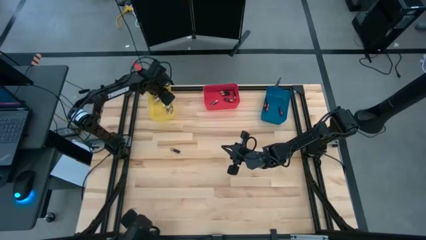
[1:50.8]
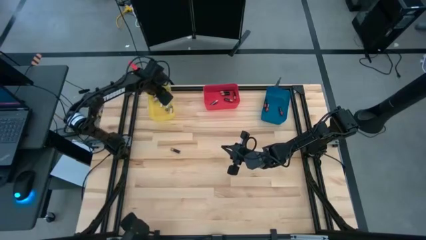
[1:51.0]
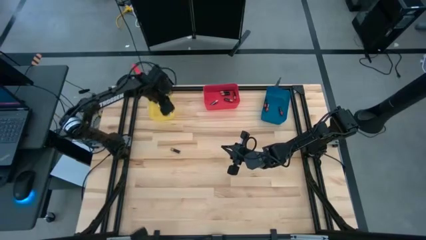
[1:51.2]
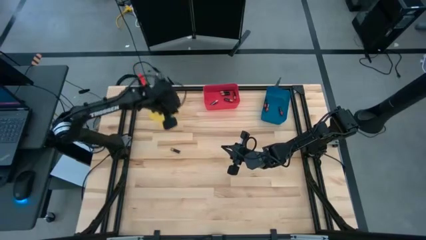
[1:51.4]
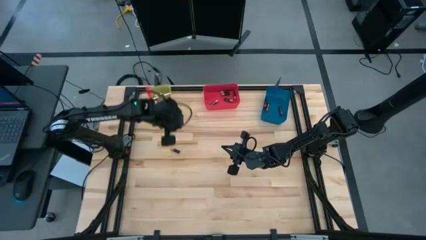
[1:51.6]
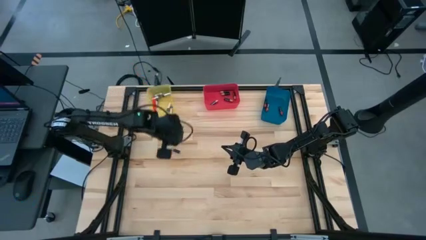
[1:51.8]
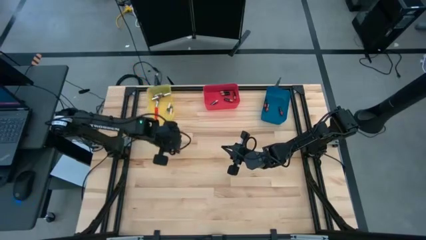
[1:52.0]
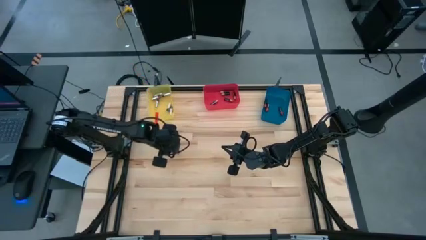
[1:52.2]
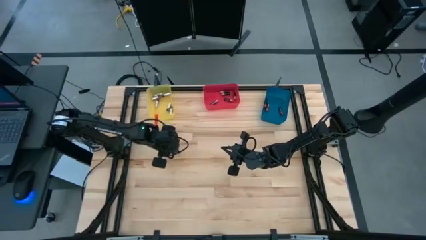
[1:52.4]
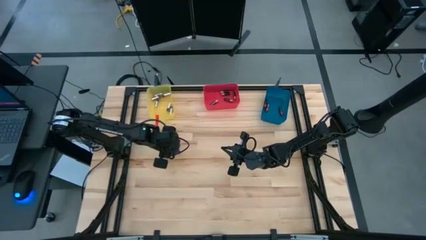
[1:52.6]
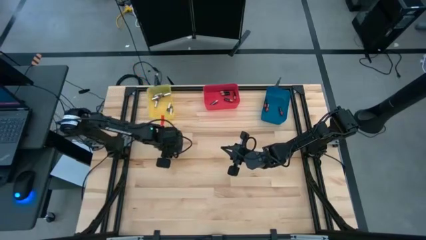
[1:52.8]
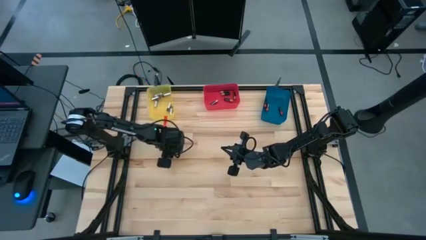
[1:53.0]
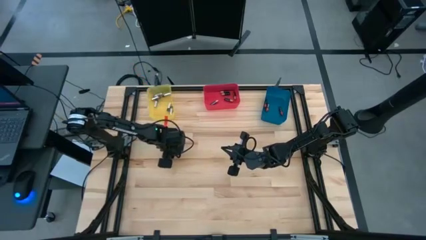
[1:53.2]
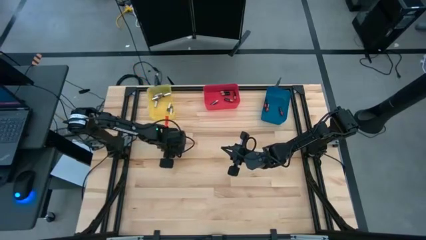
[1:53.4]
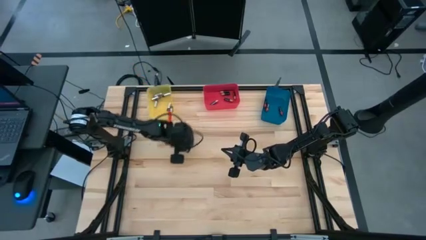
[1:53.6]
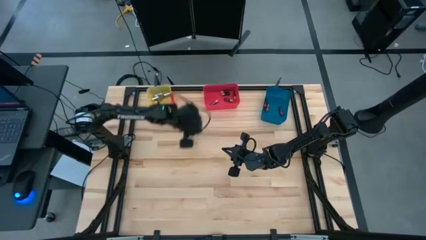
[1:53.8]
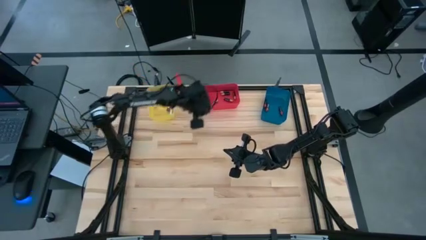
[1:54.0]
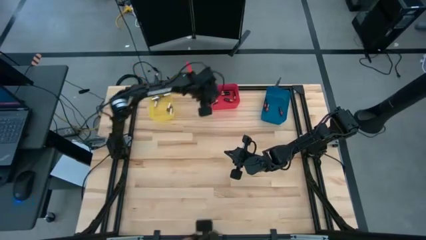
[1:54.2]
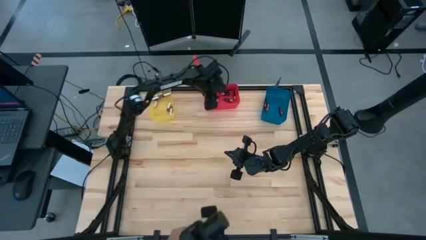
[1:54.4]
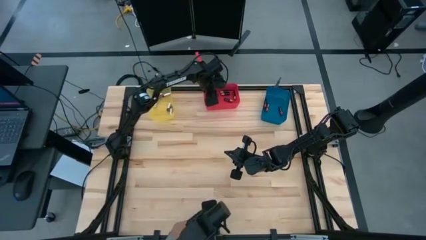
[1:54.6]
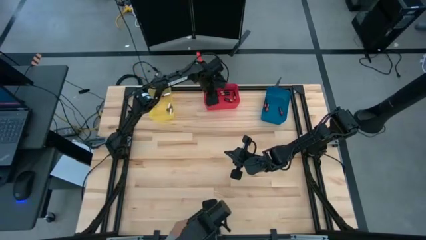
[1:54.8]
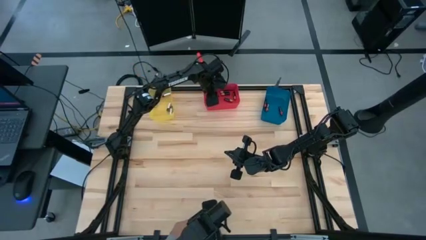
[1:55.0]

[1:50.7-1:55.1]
Task: Sort batteries
Put the brown battery into the red bin

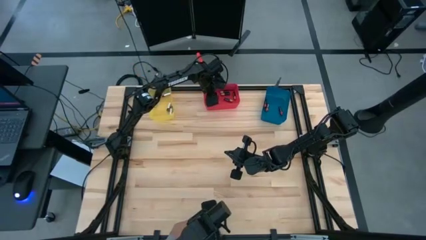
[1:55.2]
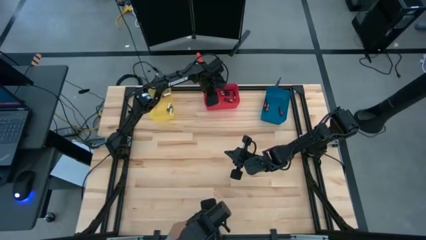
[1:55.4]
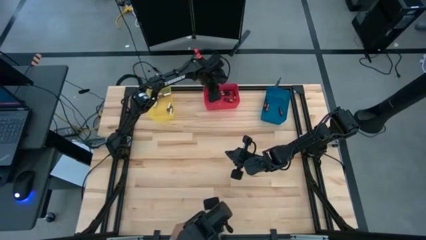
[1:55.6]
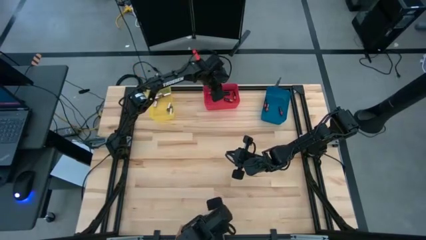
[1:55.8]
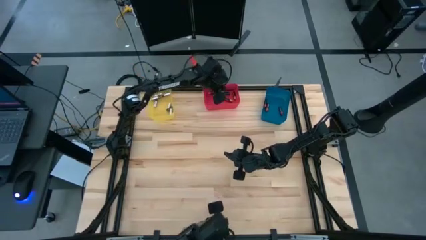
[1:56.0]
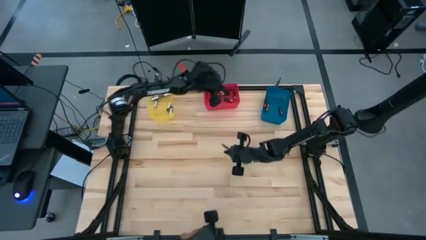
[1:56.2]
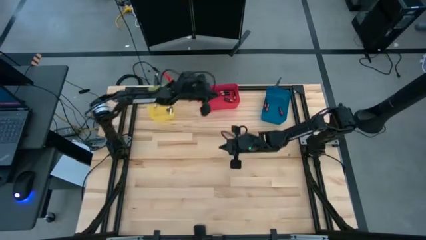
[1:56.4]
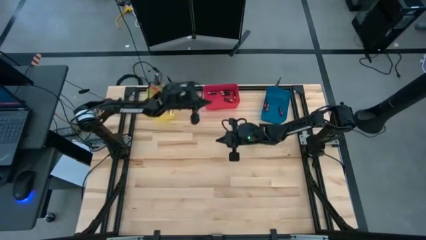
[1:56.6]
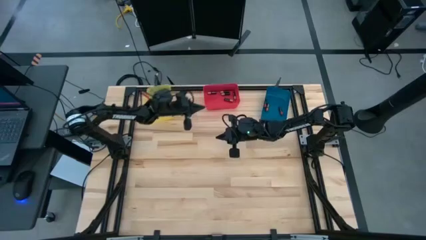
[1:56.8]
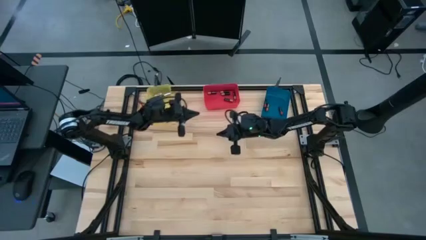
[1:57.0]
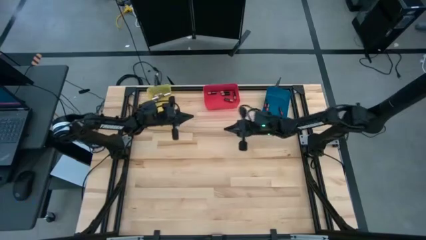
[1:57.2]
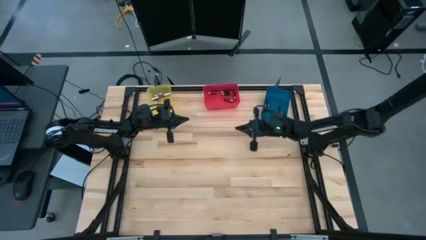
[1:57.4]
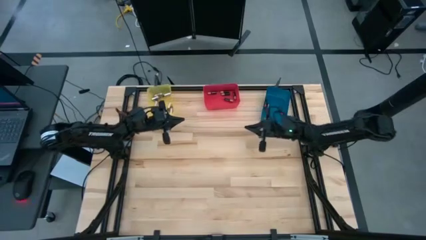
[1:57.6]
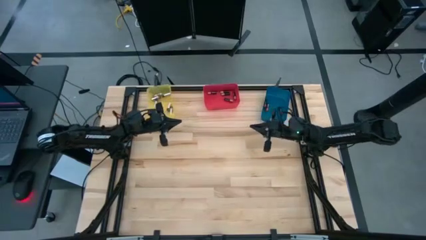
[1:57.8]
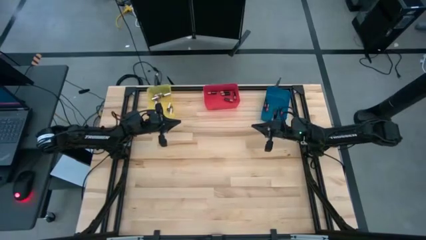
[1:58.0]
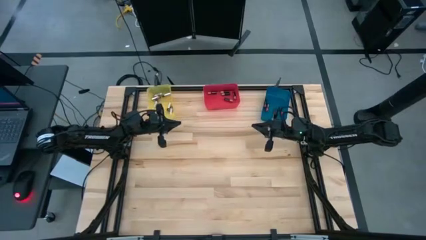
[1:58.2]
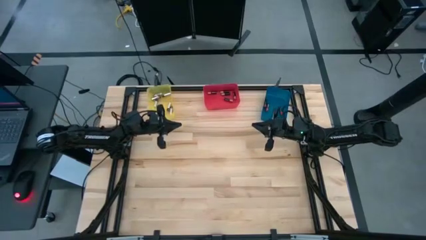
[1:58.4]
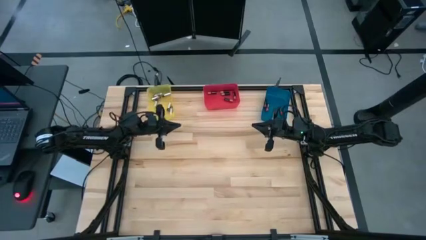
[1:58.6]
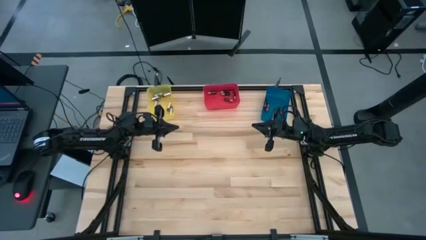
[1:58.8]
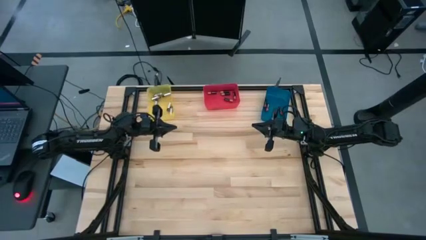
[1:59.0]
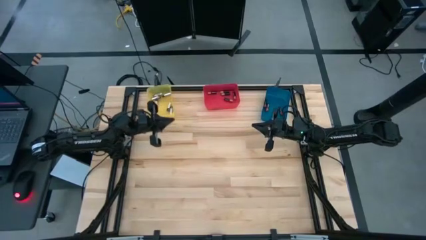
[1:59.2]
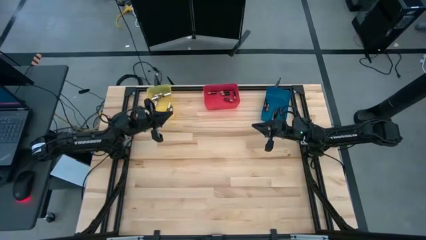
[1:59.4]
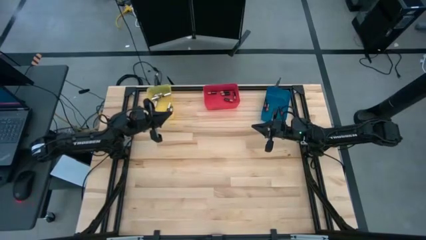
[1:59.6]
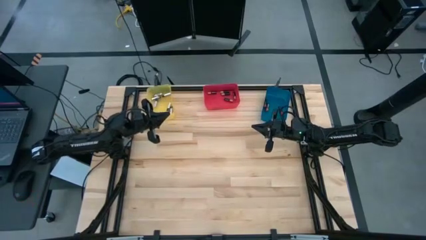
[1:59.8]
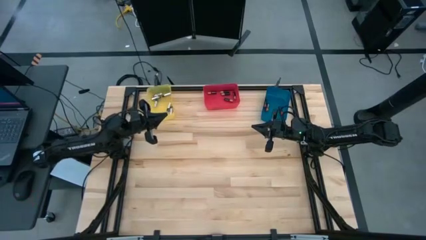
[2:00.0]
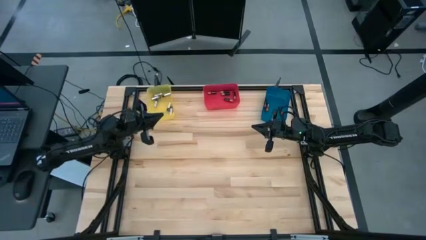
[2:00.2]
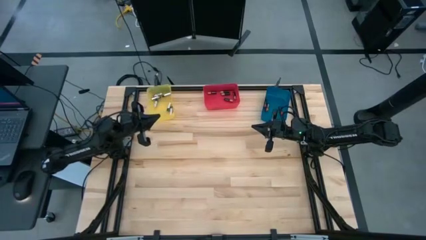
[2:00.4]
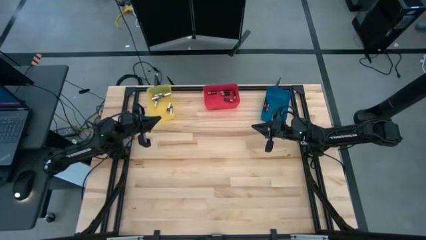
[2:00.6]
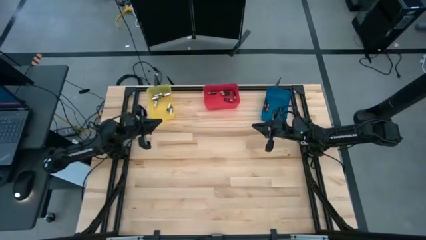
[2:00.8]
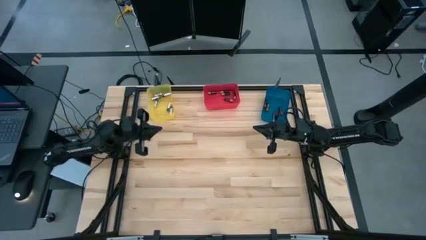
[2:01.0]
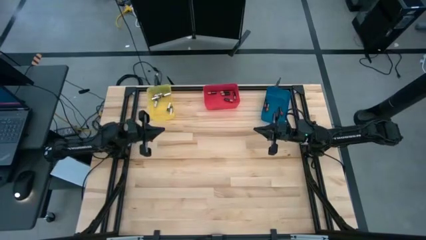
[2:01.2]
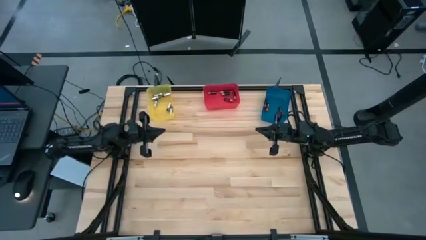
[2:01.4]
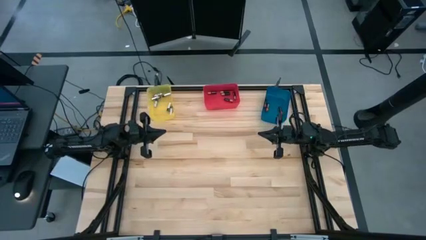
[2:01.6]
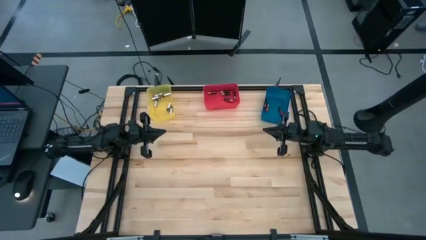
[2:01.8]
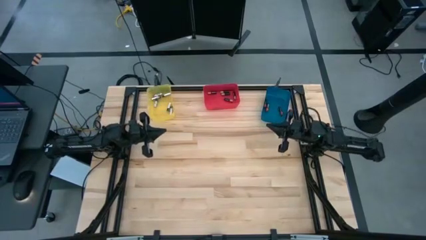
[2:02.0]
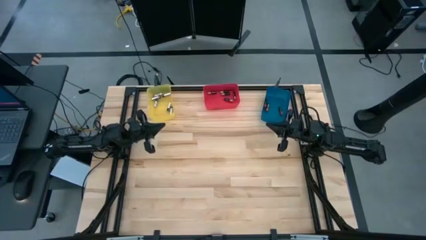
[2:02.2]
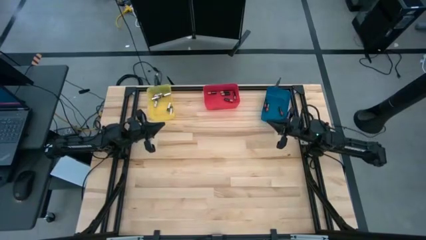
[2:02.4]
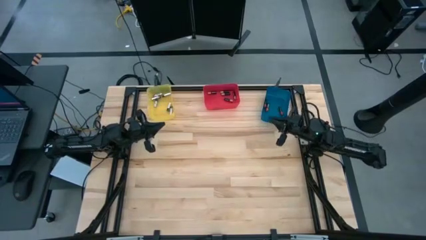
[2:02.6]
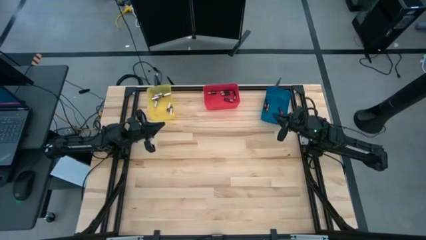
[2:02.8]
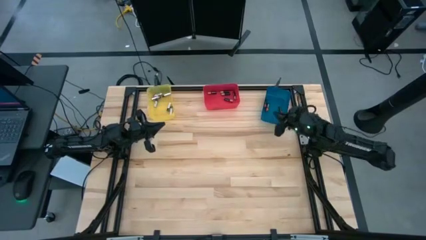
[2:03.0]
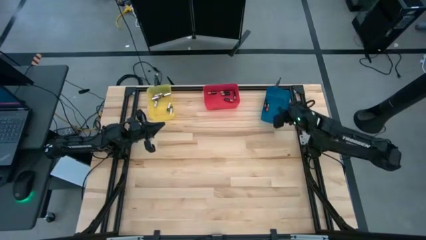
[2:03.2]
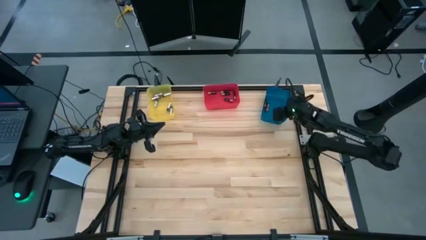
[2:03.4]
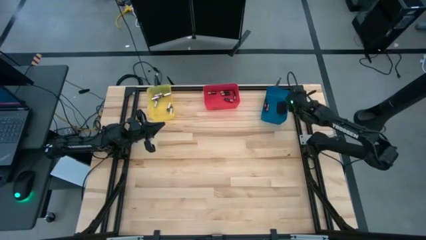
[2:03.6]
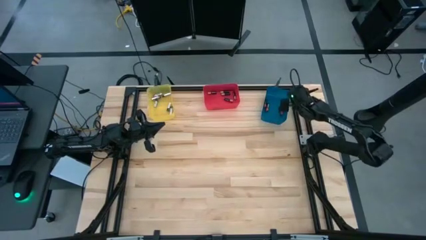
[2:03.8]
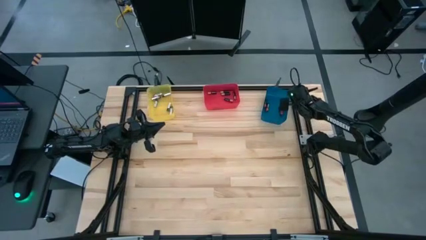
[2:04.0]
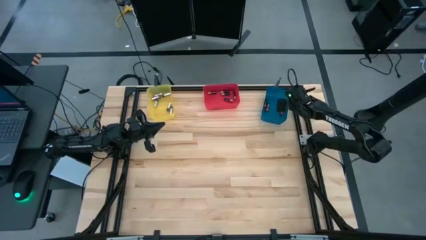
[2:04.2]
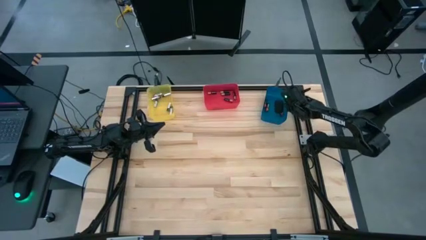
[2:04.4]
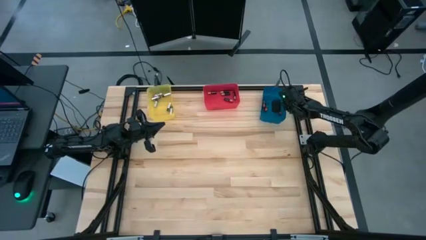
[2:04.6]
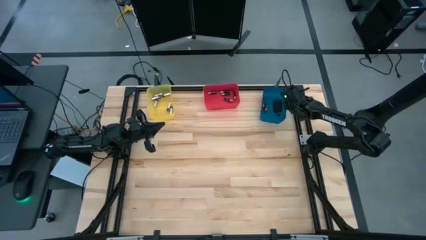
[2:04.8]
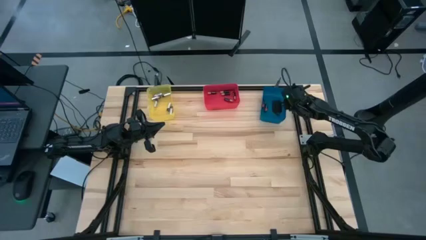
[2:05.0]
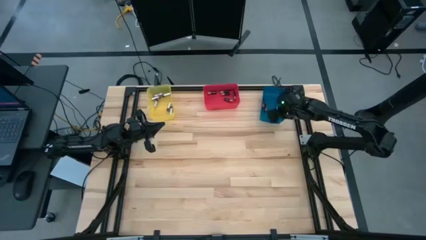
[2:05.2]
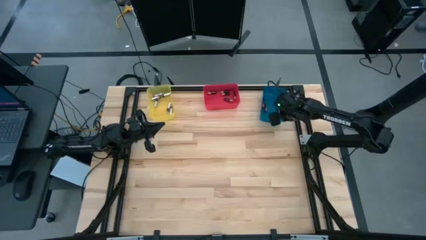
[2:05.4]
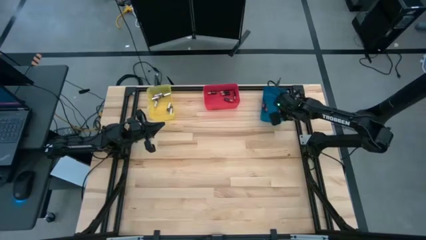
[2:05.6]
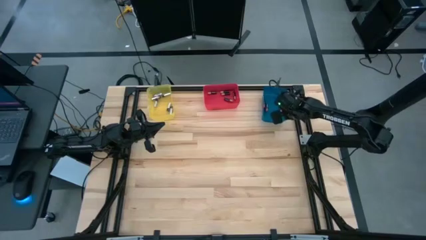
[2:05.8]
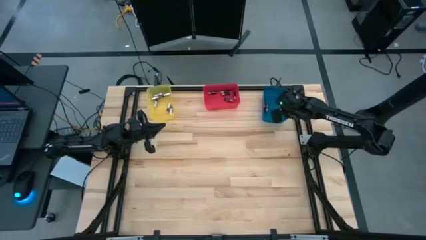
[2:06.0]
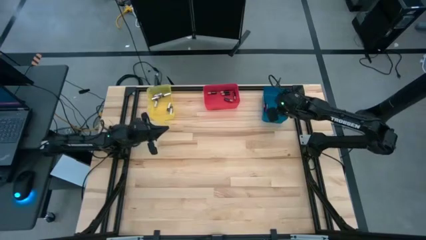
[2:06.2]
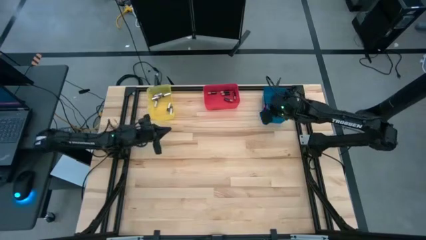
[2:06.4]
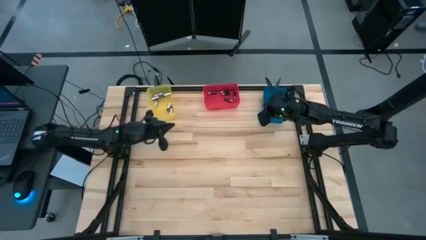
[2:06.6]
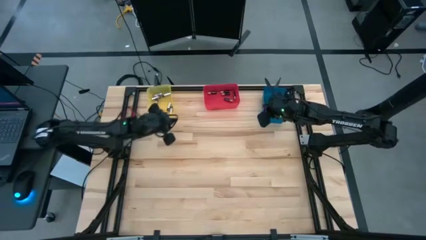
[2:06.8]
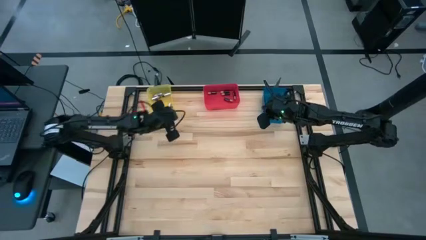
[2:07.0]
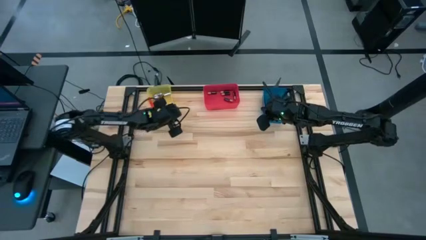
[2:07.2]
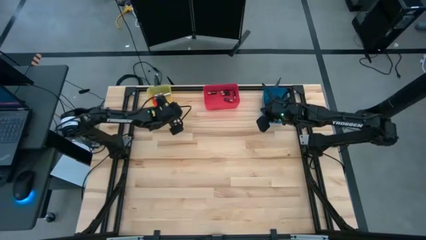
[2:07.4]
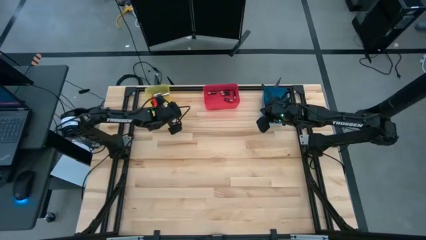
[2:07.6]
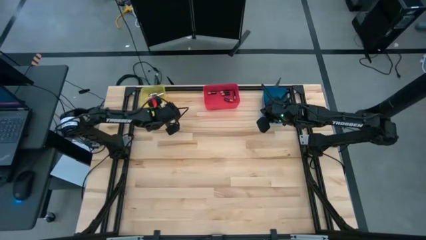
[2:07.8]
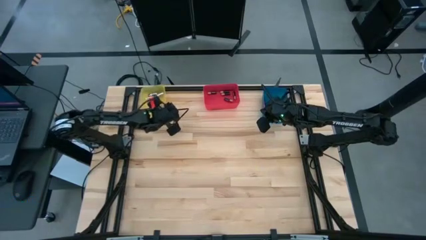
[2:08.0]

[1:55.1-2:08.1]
Adjust the bins
